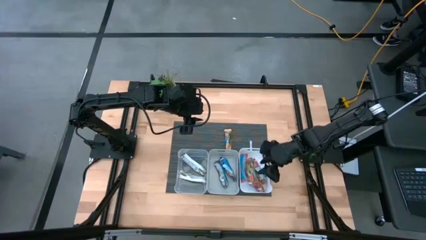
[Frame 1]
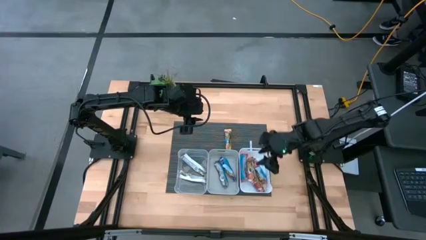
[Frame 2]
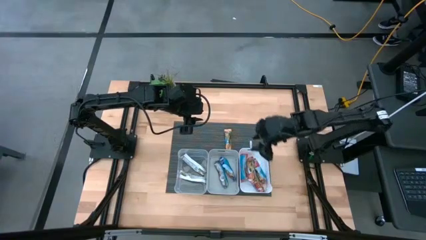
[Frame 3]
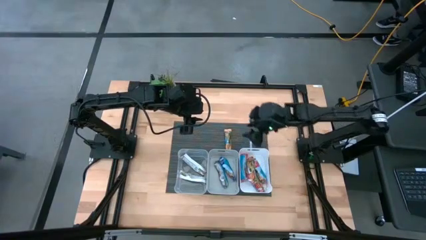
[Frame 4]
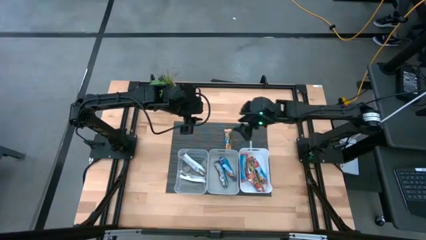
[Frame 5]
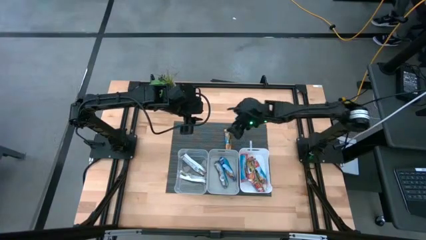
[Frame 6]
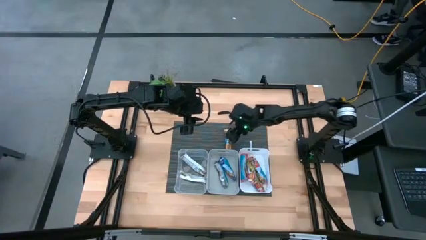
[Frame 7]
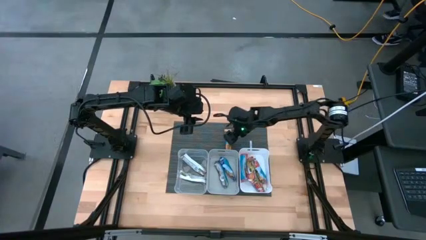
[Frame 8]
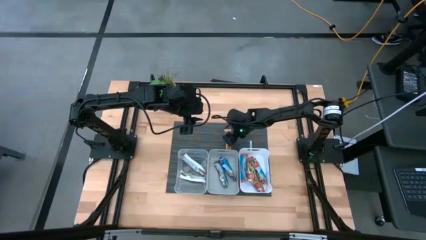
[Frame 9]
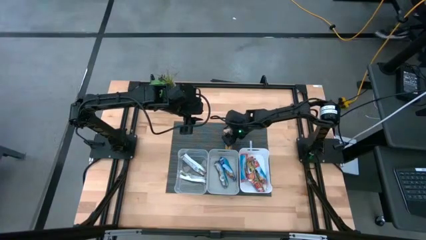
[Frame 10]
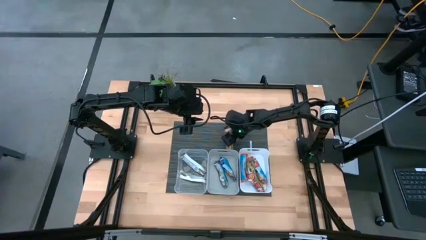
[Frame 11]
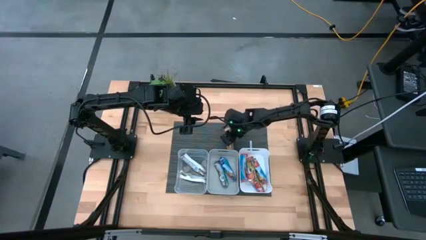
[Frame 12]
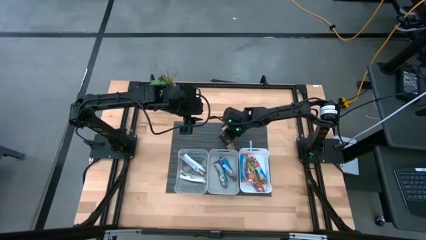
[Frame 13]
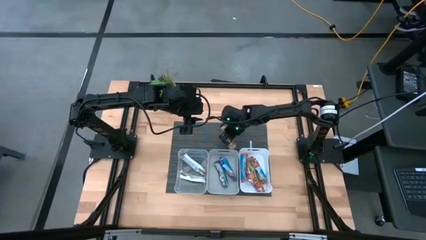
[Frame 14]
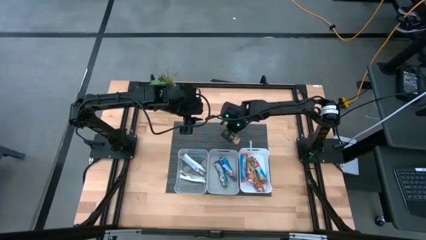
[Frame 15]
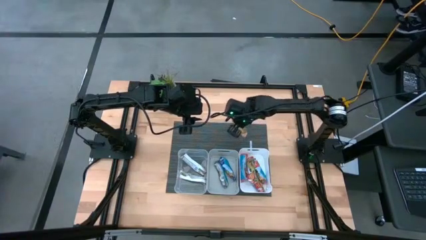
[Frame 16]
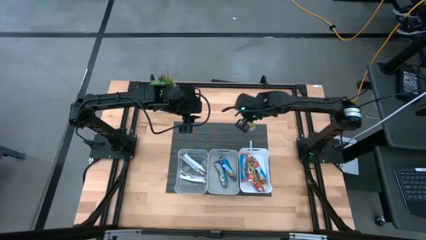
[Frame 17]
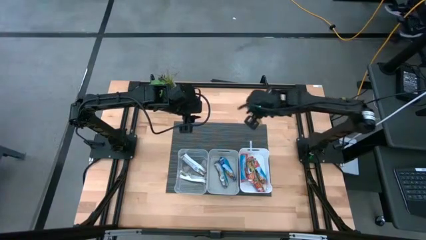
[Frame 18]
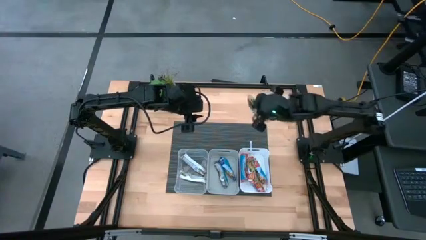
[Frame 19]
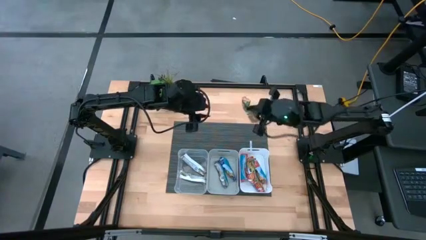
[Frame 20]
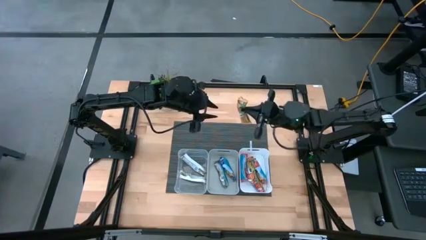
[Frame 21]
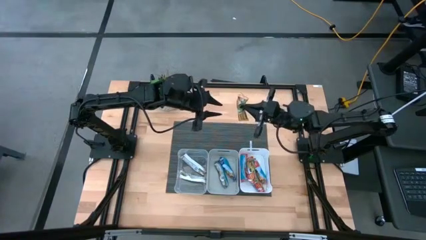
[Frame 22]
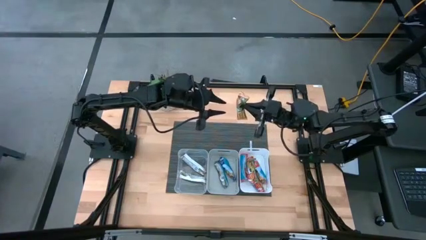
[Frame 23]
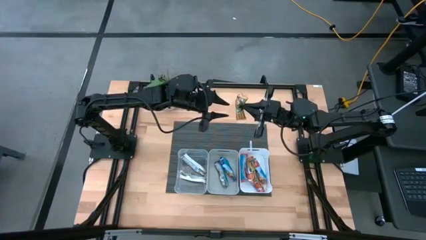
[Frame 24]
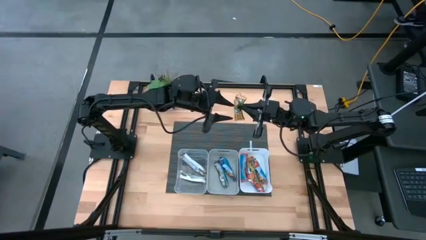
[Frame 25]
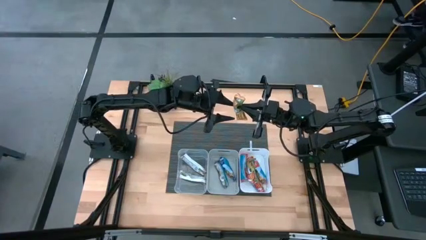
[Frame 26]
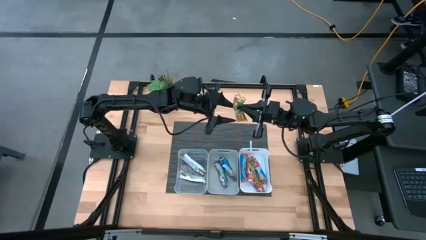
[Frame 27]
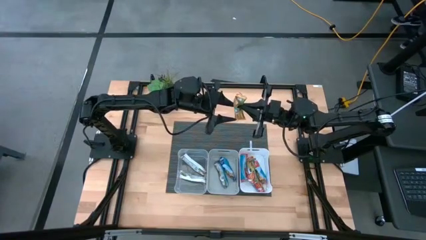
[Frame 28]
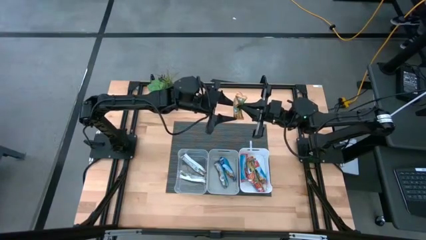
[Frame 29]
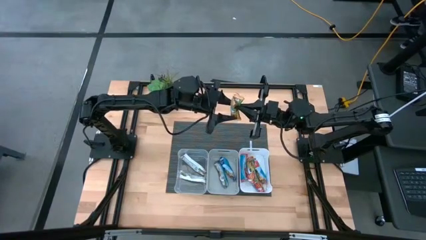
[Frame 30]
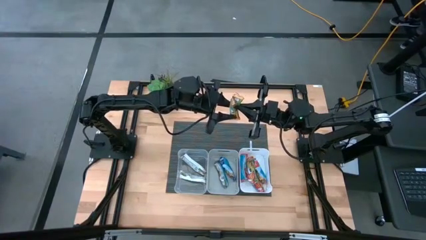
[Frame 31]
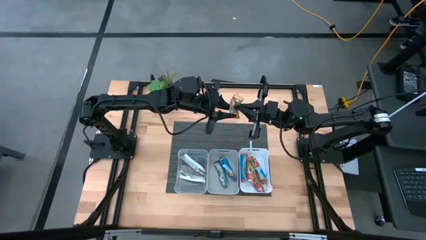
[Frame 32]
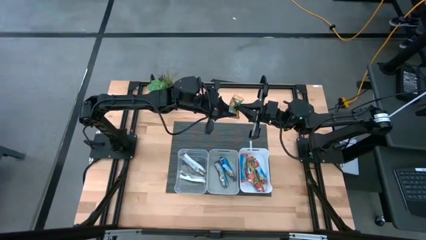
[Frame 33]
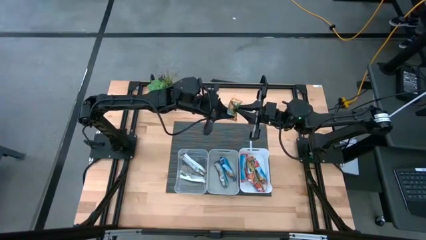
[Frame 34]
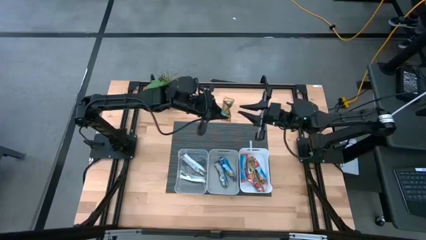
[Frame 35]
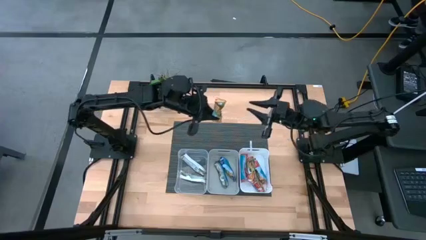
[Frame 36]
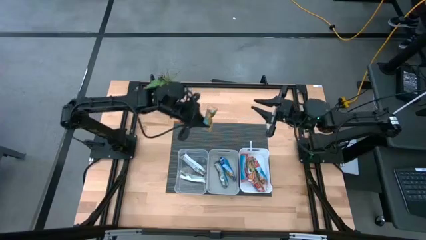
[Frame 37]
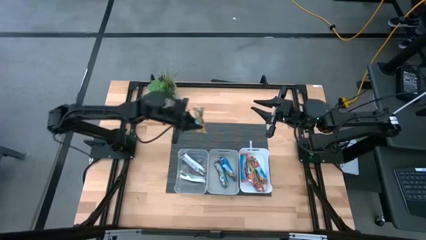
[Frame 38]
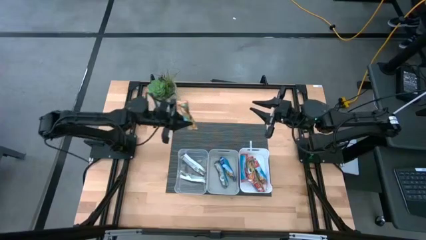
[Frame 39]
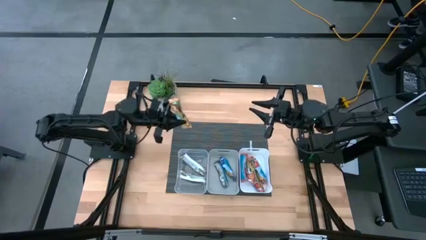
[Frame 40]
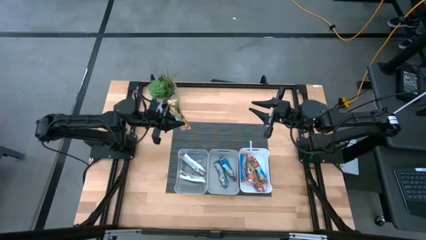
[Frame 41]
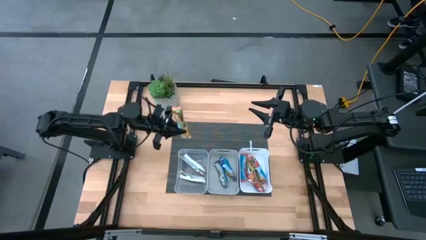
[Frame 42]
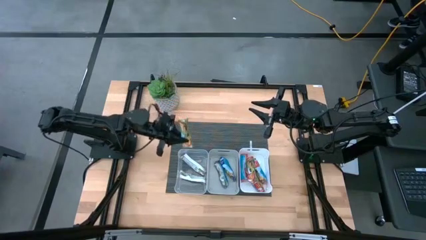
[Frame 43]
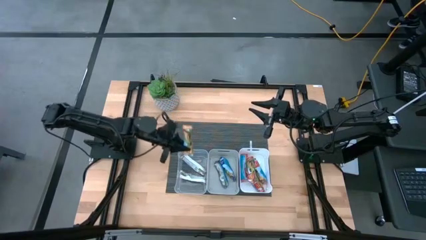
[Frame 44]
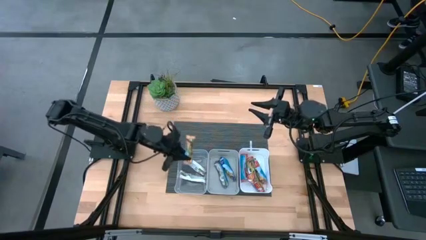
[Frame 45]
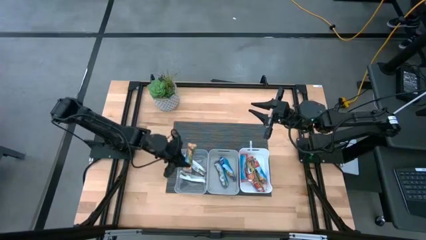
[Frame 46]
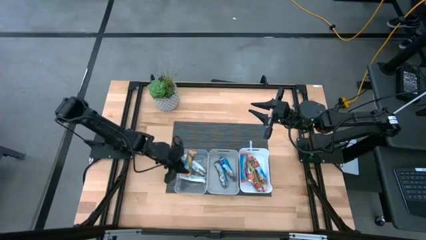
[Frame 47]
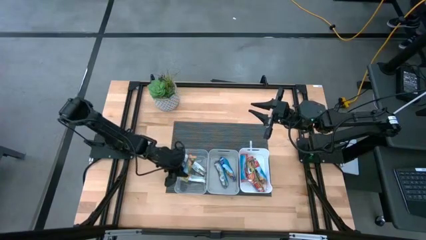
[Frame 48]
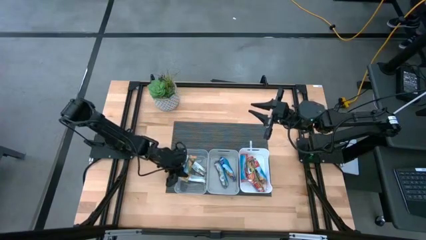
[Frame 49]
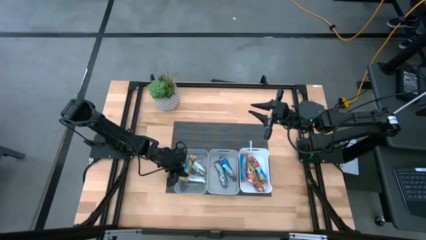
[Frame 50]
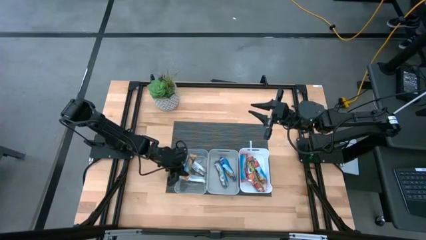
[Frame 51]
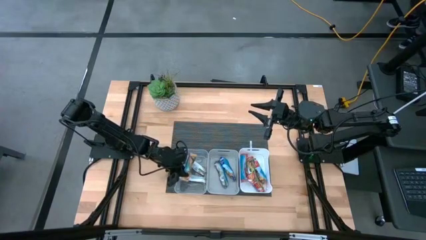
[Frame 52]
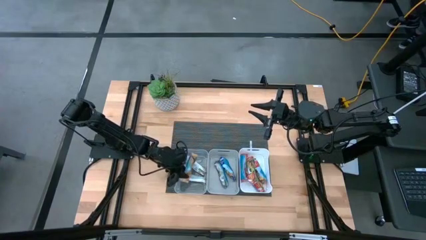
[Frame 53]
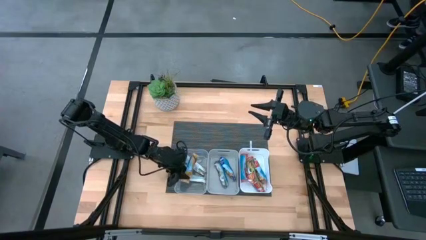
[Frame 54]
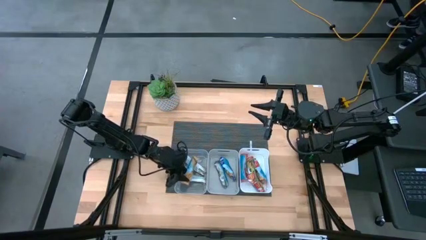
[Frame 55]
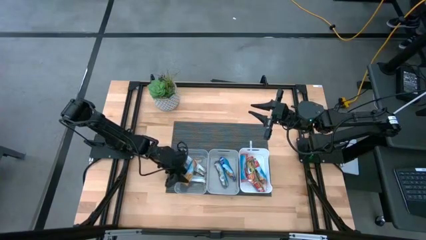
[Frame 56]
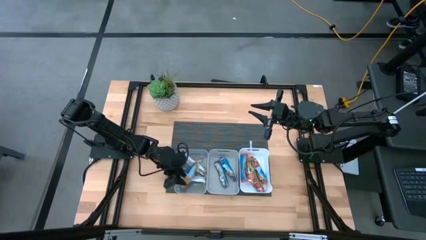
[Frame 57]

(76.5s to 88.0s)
Task: Pick and place Granola Bars by type
Put the yellow granola bar into the transparent bin

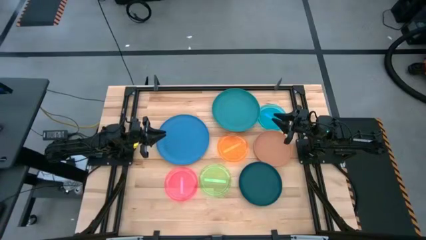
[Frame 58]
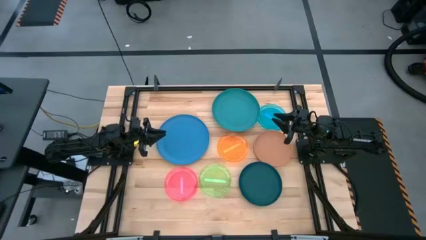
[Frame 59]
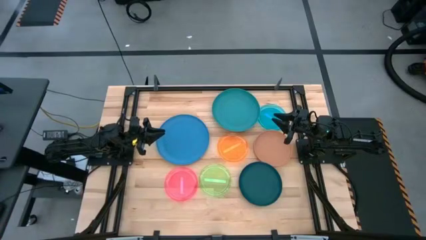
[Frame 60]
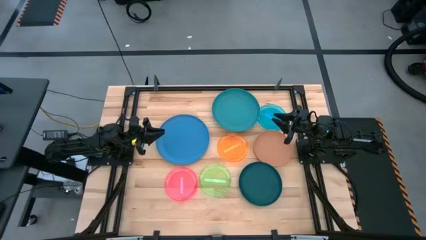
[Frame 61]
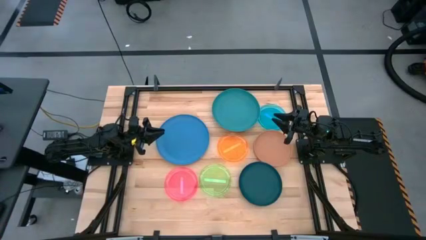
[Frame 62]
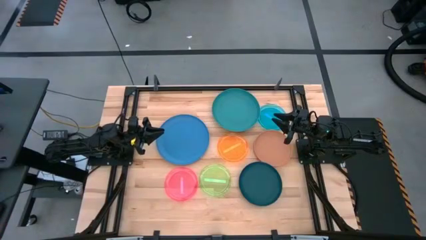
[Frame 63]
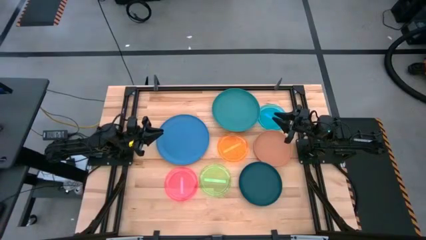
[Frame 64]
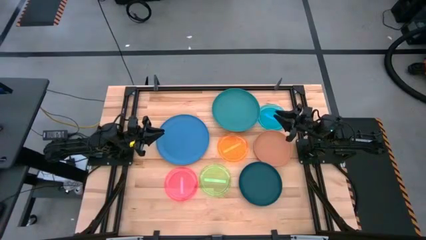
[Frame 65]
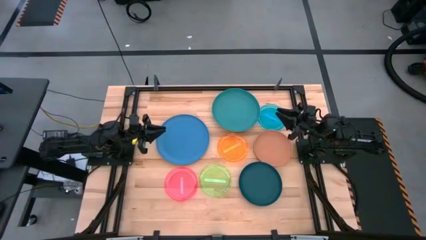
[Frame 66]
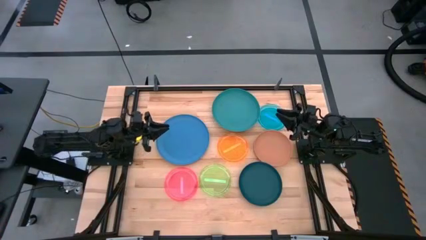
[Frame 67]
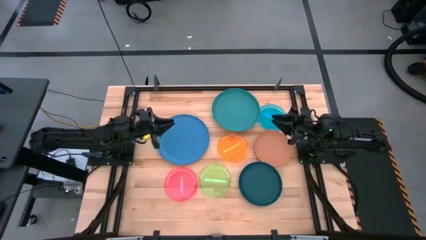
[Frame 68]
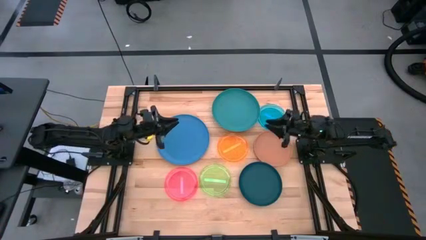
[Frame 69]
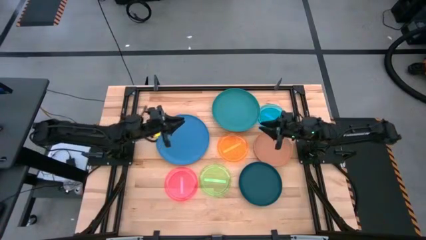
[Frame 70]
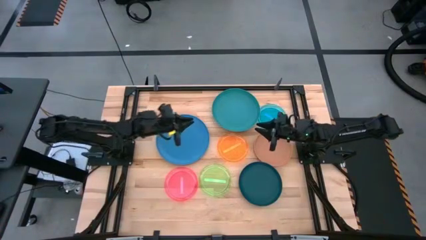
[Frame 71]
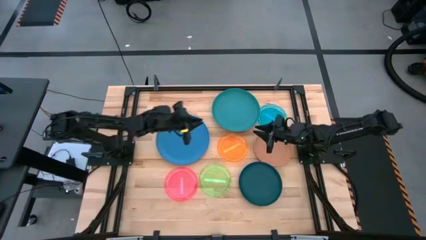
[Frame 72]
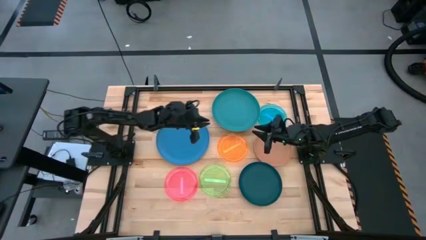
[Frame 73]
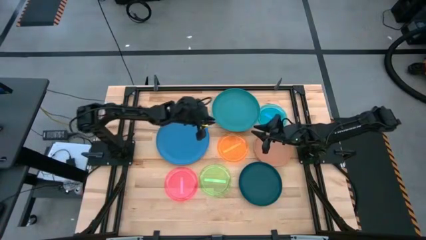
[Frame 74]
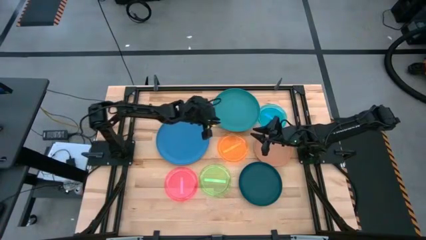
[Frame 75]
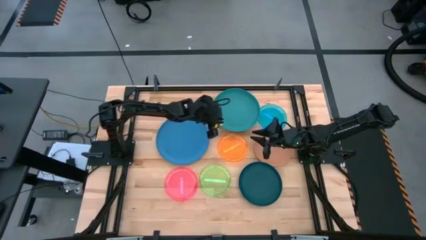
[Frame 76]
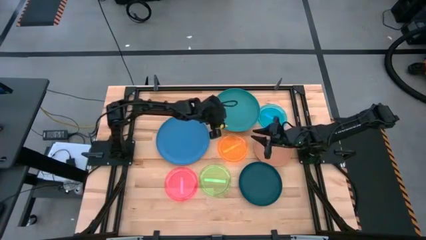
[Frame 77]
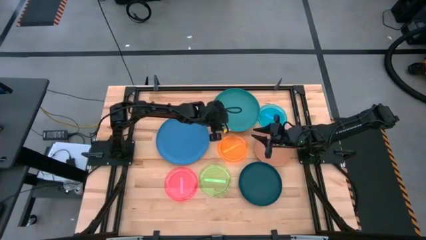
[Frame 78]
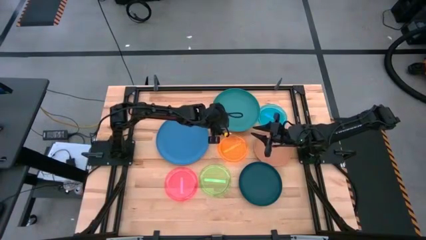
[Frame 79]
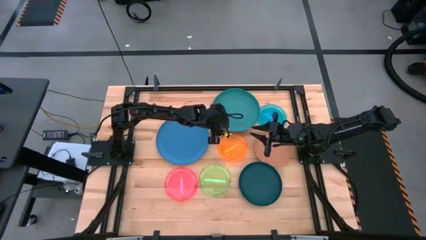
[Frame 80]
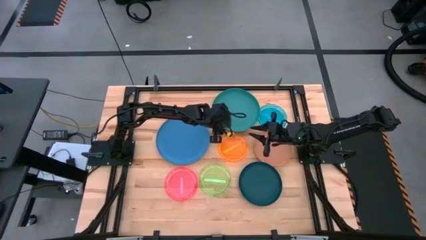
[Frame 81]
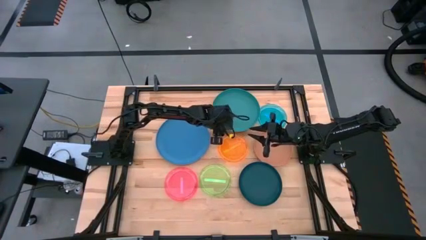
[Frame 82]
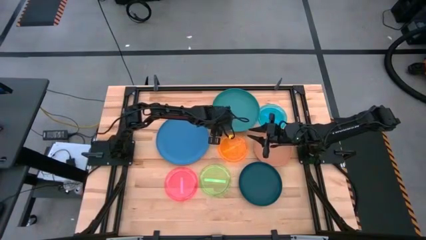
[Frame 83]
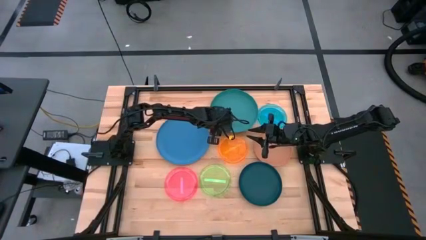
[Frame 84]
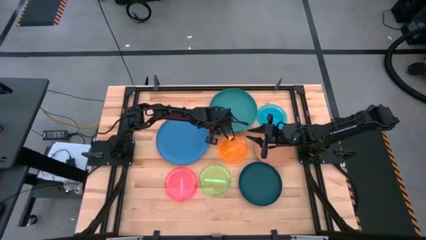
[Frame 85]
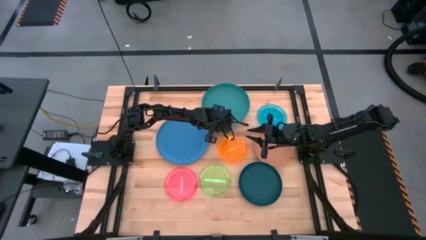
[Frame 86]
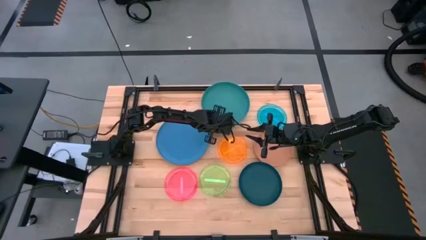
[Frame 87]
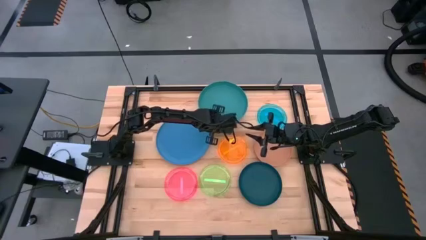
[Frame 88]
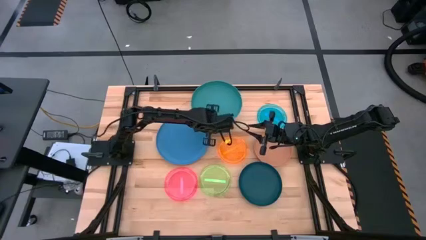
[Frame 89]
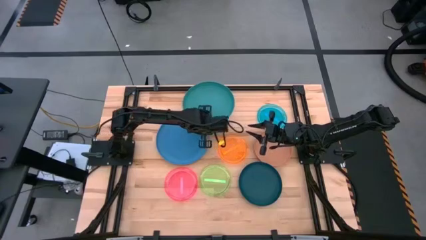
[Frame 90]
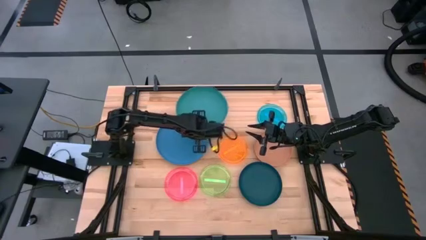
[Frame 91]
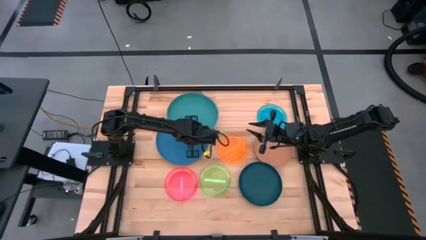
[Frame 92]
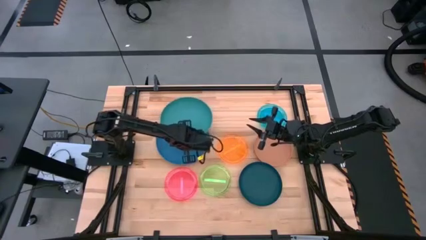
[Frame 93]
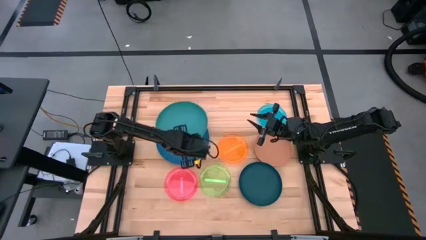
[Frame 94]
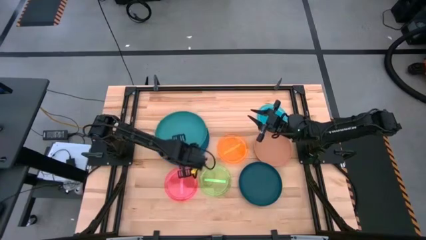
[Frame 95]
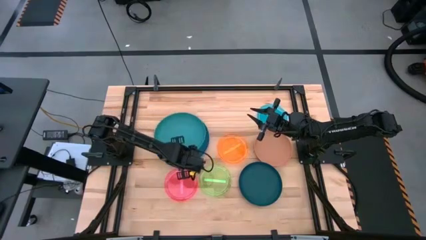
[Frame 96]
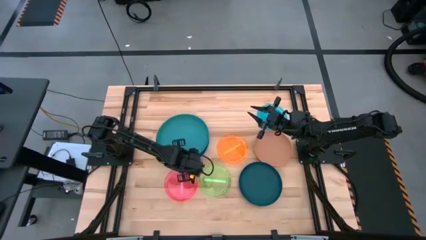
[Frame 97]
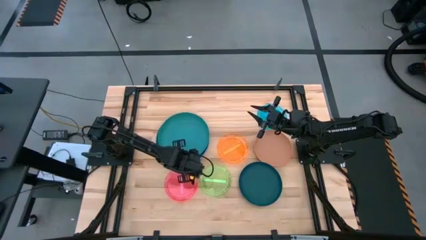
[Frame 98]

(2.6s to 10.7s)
Task: Stack plastic plates
Stack the green plate on the blue plate
